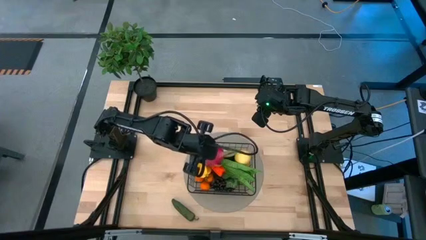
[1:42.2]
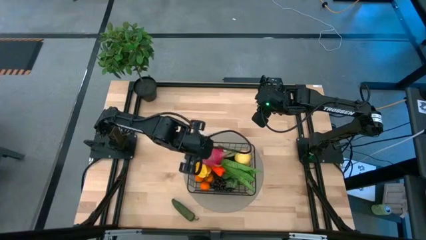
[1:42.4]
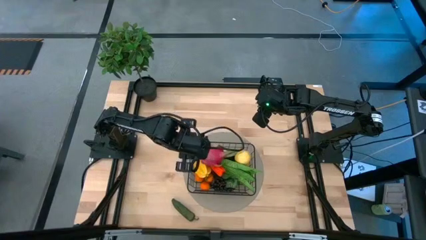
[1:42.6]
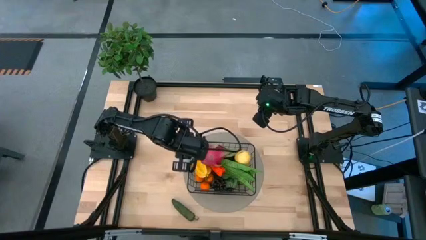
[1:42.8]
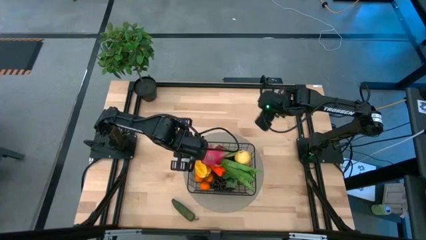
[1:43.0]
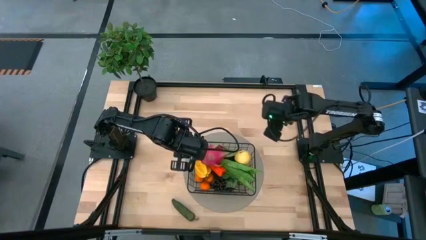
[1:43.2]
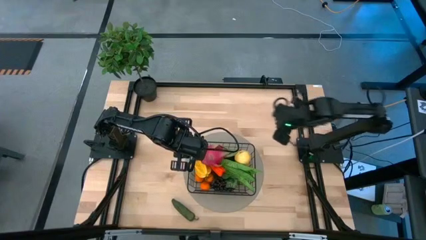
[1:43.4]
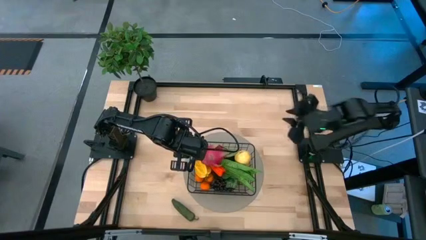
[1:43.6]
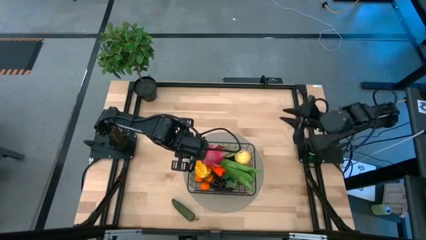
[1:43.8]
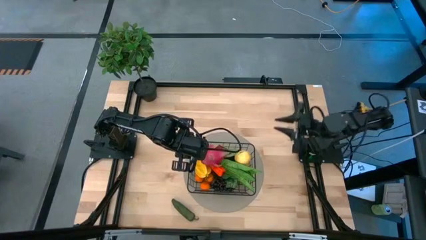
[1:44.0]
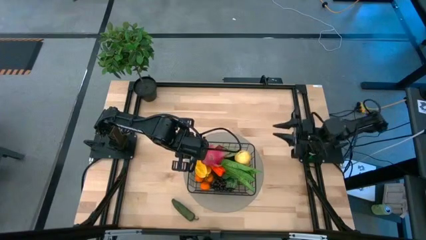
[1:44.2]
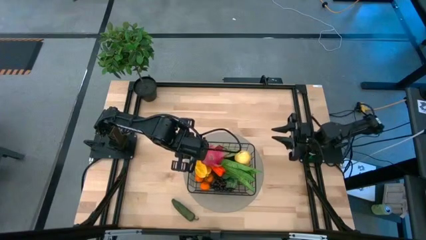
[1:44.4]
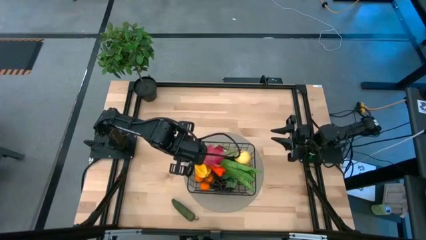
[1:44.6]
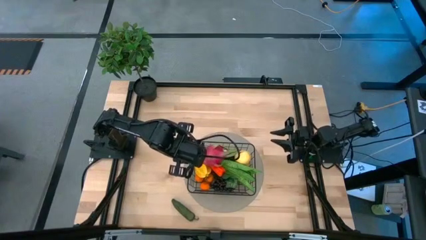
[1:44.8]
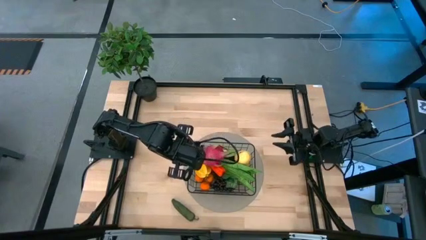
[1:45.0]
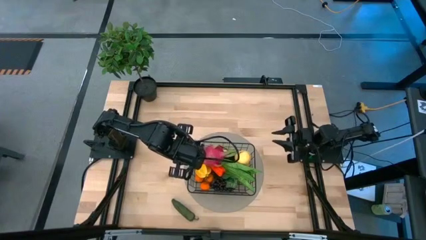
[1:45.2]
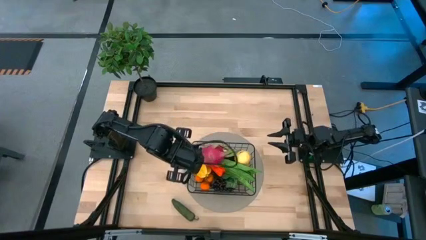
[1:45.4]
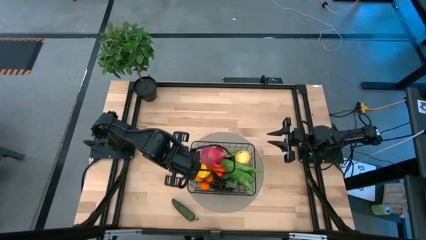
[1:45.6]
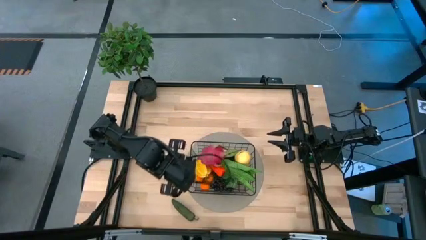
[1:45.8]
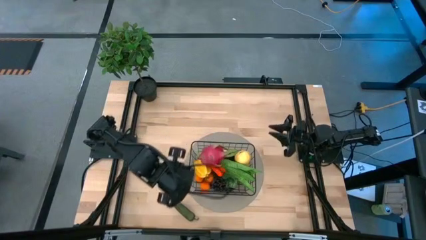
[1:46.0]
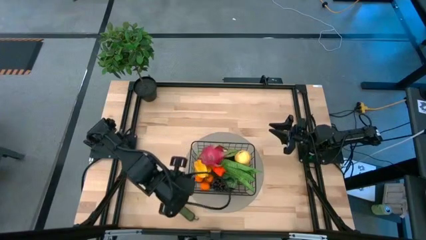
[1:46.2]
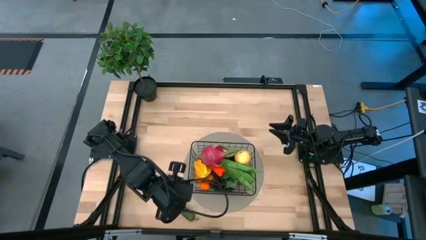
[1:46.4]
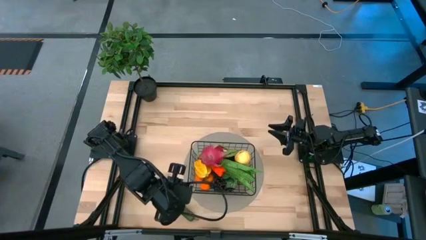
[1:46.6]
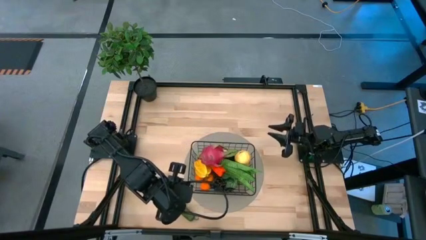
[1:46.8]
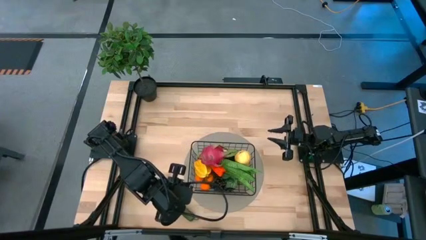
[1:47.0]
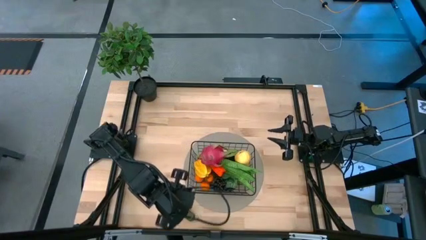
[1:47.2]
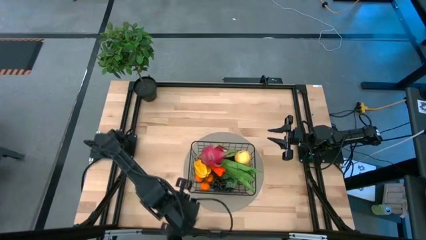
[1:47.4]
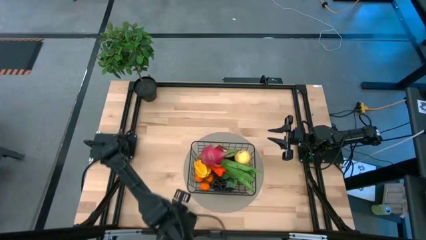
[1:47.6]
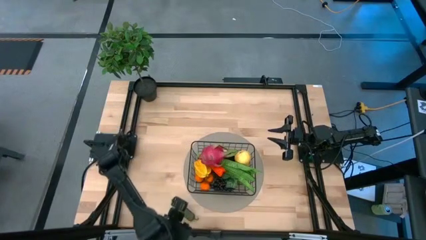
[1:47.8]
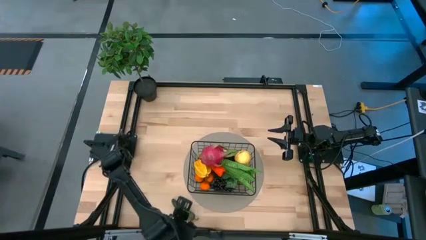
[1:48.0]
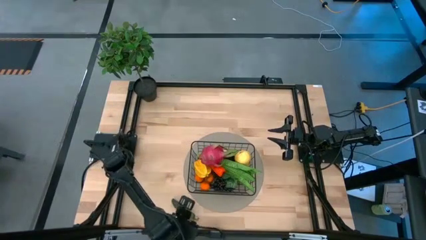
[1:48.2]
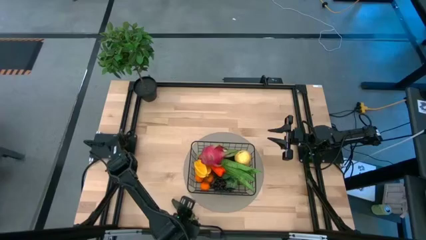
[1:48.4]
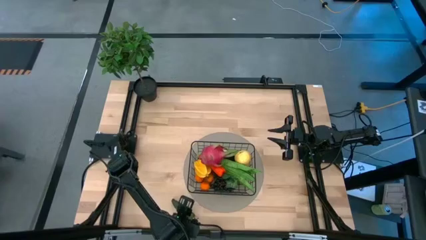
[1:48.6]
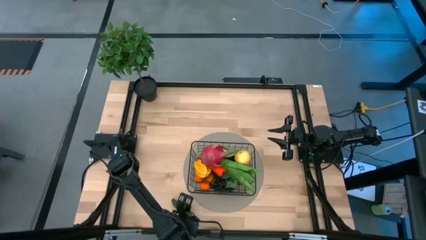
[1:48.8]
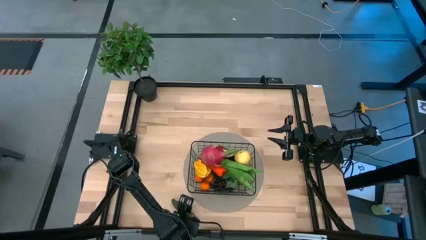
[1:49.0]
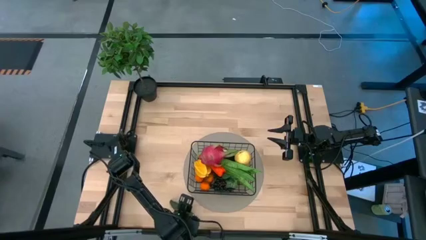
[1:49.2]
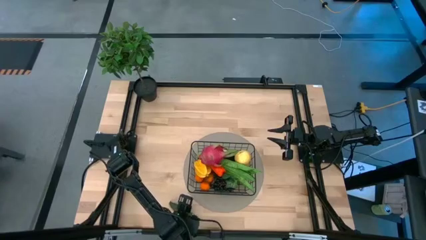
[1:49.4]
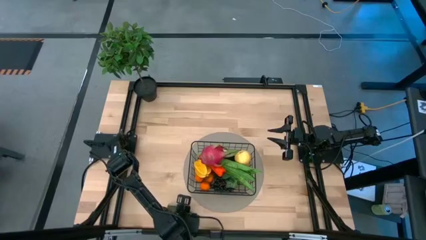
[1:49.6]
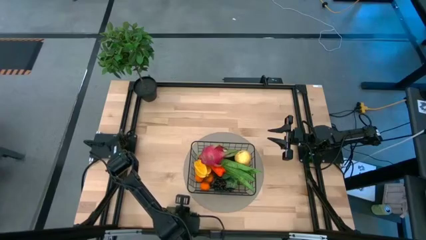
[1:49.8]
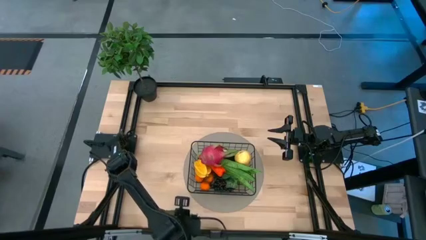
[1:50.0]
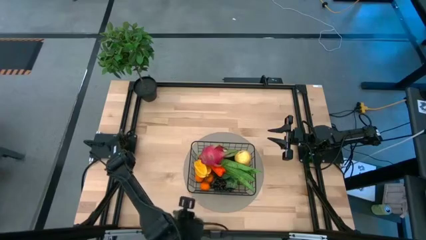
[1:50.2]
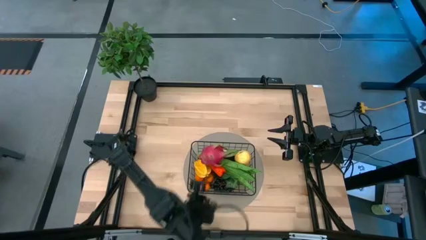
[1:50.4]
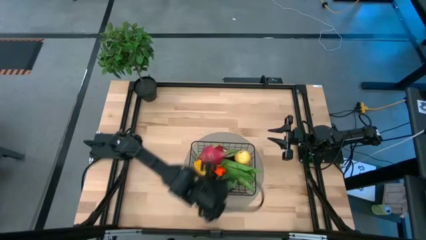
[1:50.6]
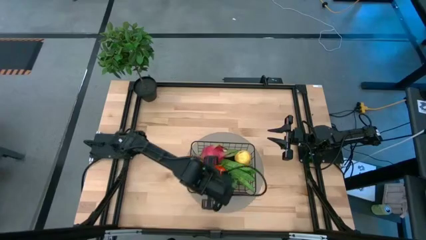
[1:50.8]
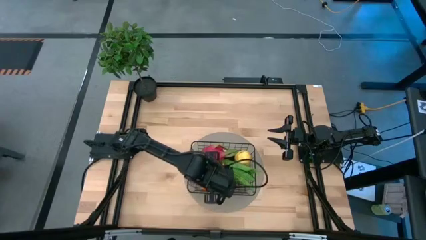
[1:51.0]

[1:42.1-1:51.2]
Task: Build produce basket
Put the pepper into the black basket

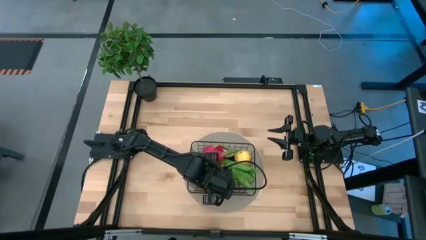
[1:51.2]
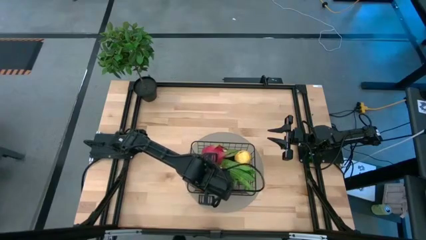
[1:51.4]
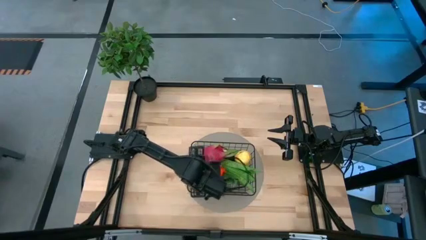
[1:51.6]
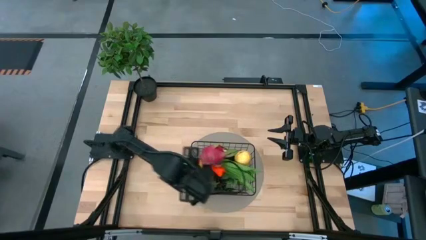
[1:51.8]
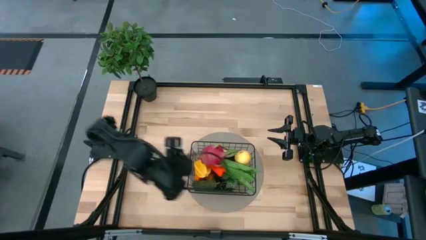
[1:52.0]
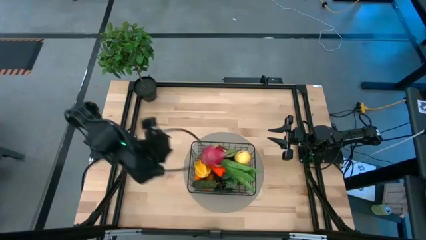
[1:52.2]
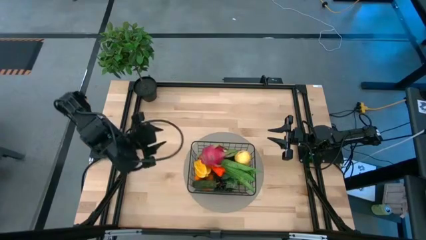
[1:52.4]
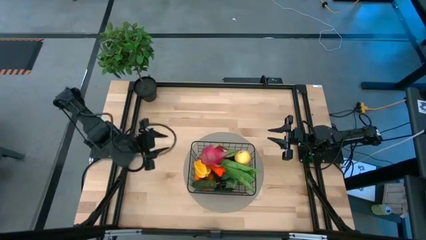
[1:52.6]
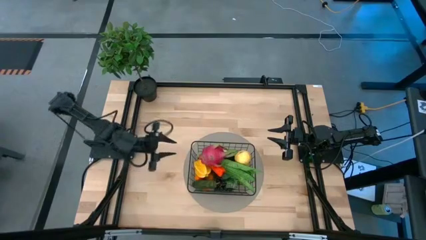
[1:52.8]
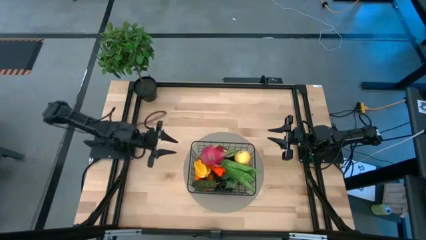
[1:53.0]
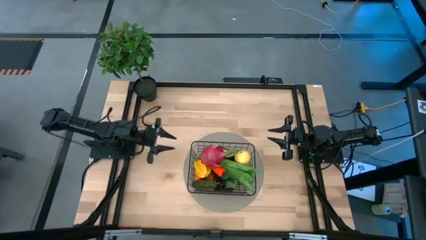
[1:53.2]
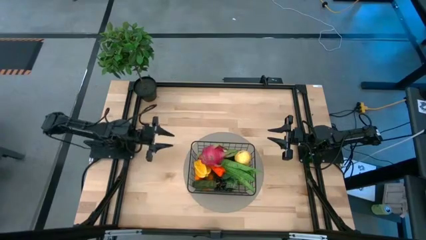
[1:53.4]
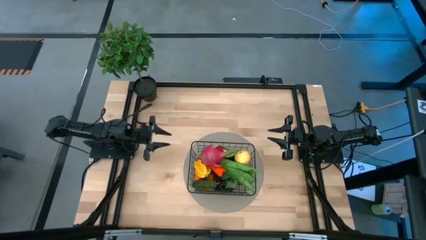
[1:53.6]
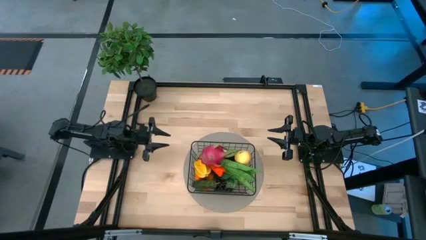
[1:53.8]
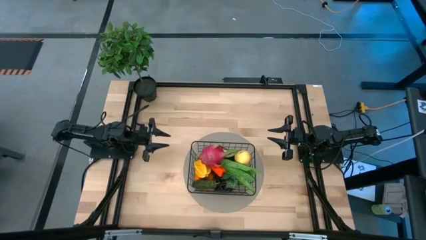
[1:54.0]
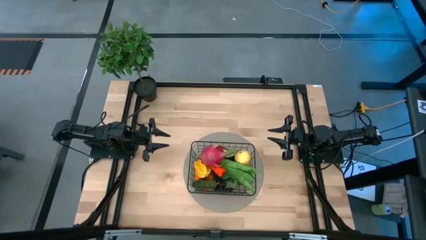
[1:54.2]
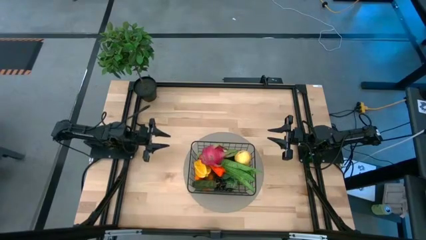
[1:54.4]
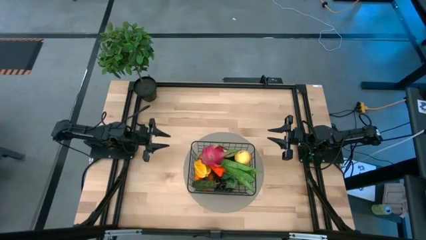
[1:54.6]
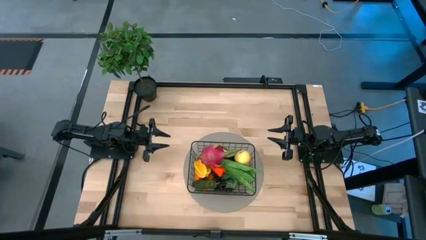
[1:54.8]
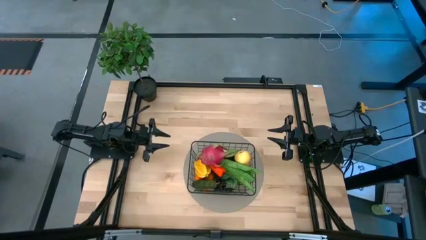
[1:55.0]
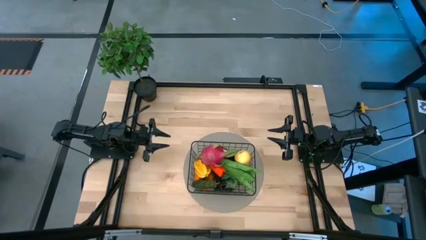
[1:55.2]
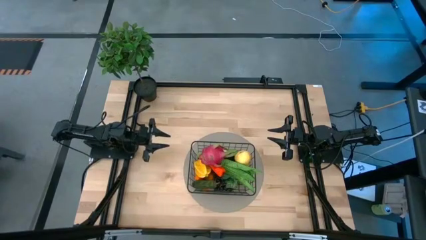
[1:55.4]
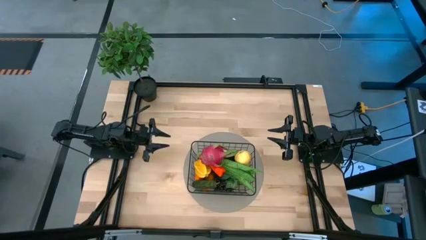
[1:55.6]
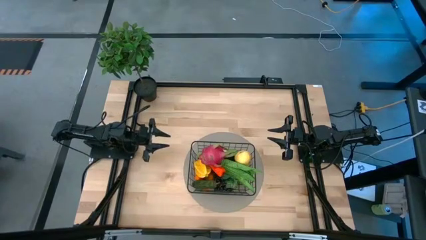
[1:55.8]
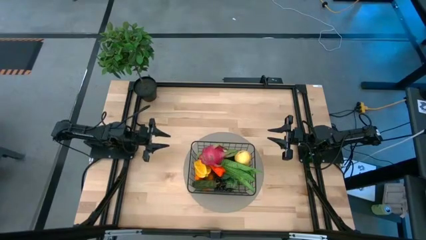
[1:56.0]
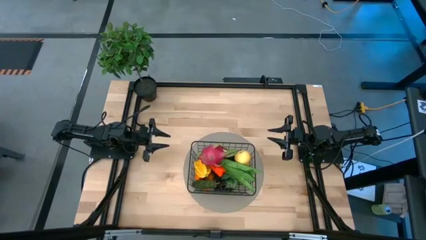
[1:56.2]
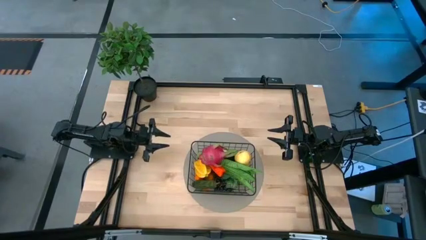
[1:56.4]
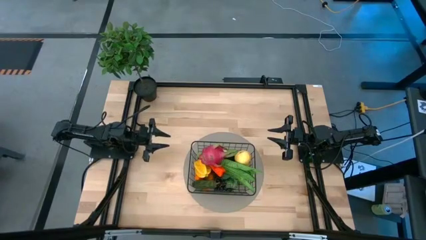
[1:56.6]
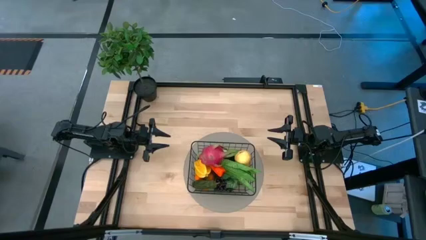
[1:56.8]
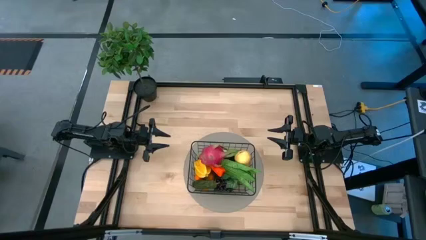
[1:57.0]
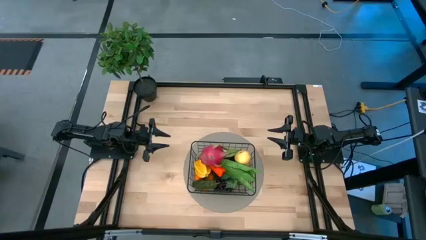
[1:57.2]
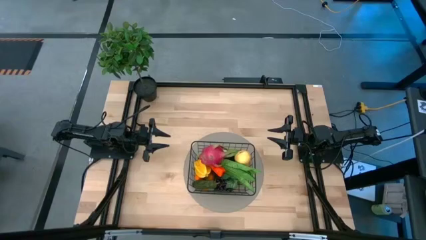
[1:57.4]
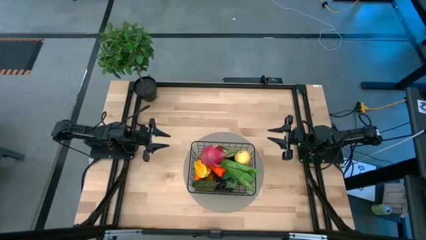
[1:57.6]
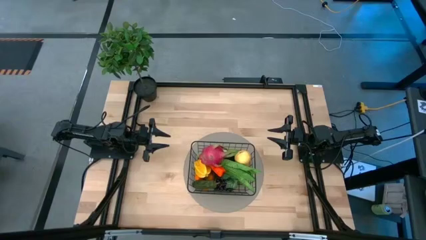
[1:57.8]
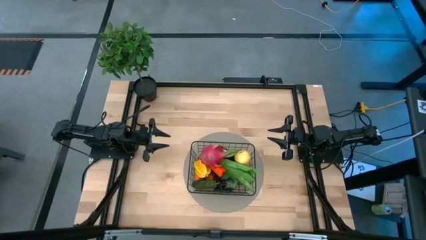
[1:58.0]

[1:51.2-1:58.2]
Return to Home Position
